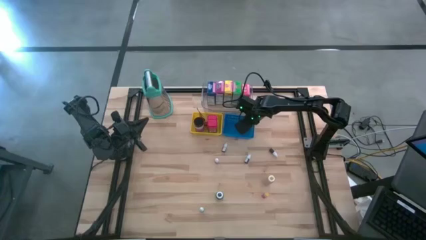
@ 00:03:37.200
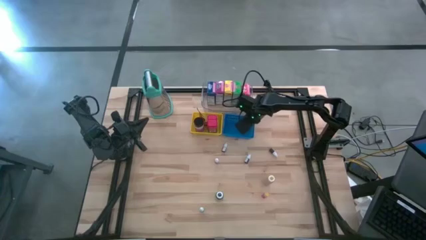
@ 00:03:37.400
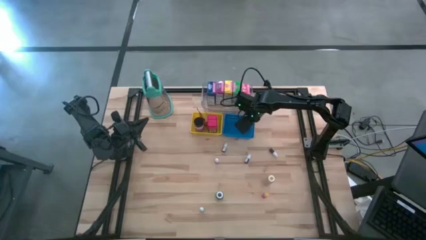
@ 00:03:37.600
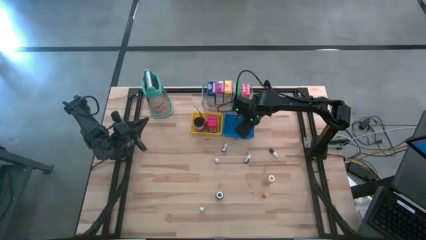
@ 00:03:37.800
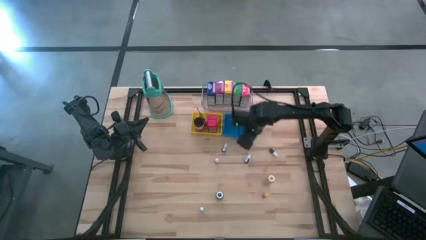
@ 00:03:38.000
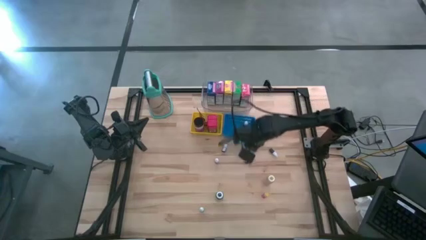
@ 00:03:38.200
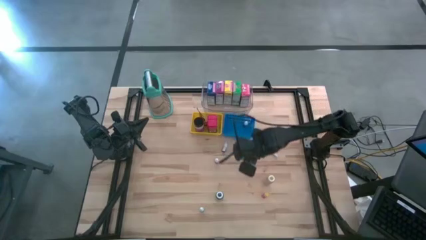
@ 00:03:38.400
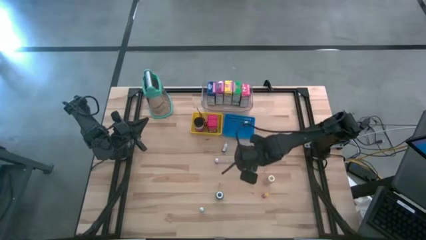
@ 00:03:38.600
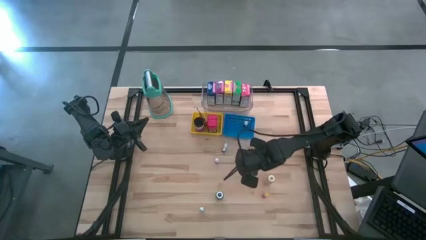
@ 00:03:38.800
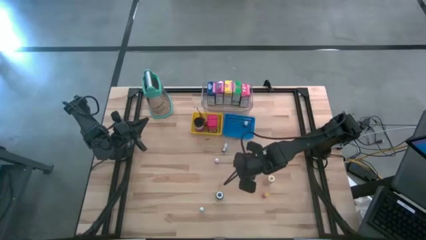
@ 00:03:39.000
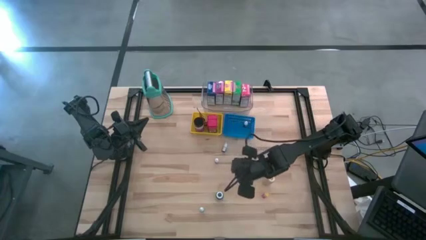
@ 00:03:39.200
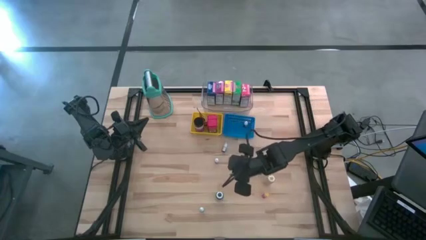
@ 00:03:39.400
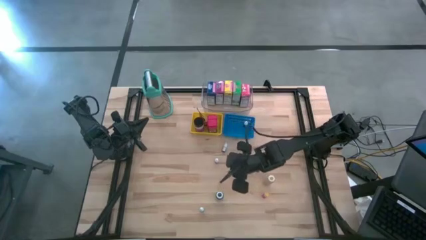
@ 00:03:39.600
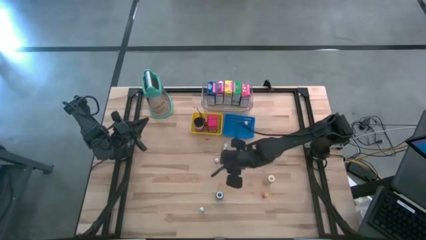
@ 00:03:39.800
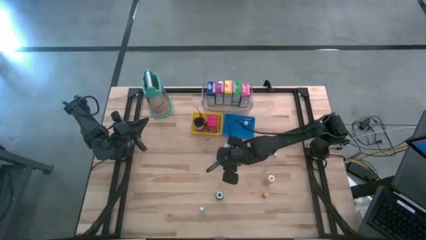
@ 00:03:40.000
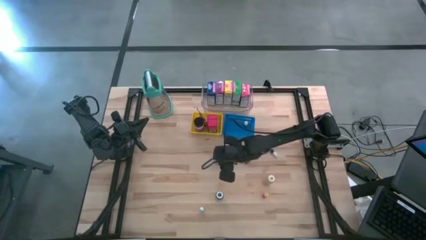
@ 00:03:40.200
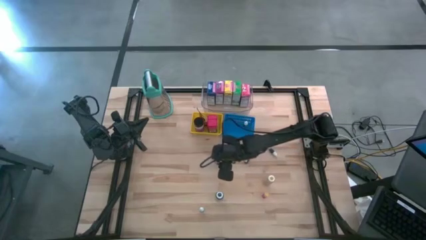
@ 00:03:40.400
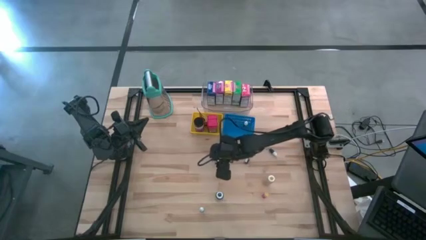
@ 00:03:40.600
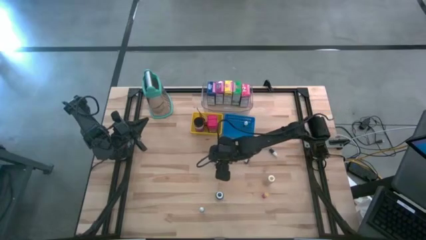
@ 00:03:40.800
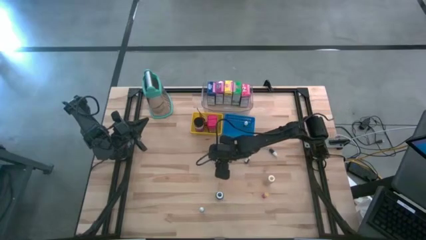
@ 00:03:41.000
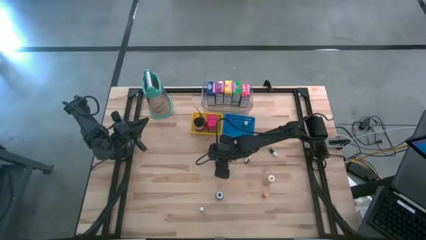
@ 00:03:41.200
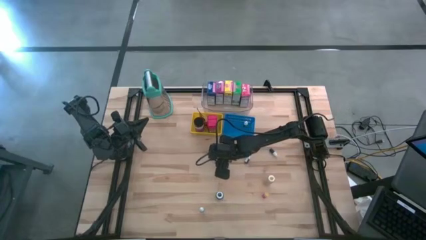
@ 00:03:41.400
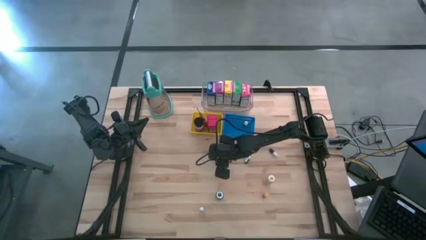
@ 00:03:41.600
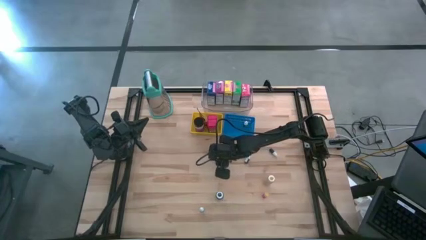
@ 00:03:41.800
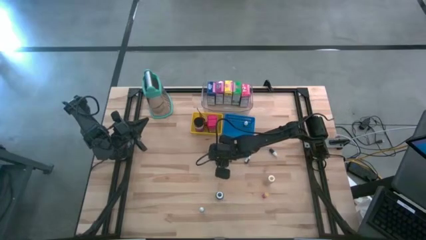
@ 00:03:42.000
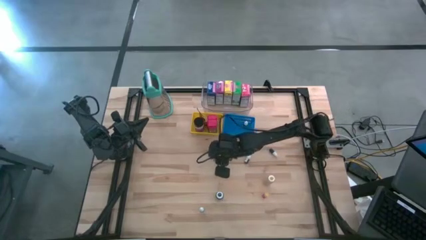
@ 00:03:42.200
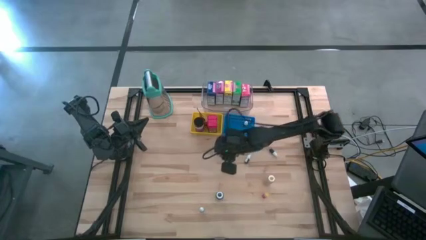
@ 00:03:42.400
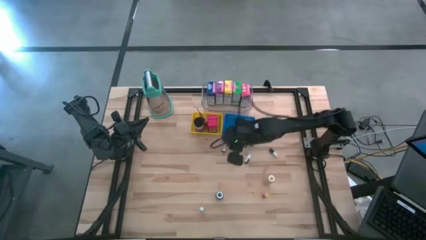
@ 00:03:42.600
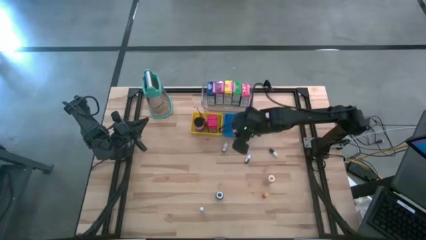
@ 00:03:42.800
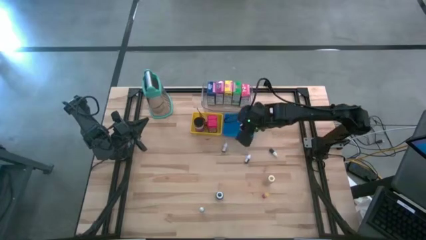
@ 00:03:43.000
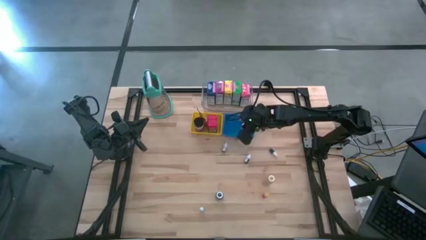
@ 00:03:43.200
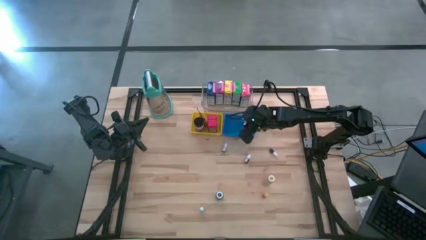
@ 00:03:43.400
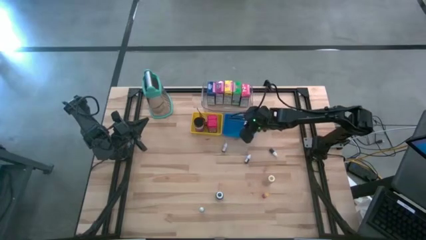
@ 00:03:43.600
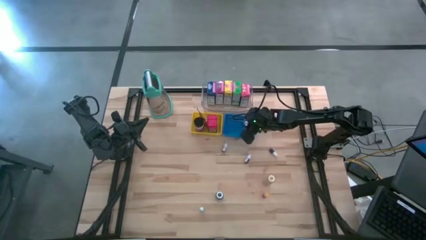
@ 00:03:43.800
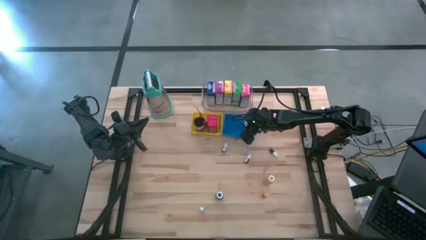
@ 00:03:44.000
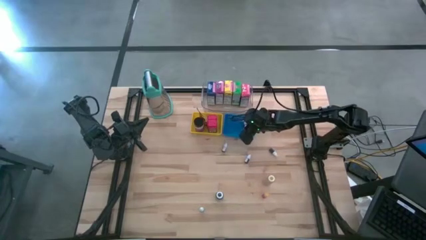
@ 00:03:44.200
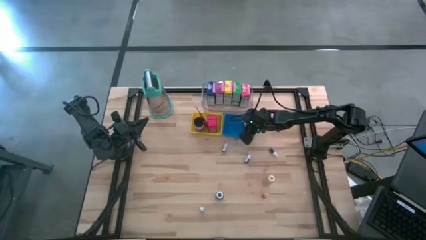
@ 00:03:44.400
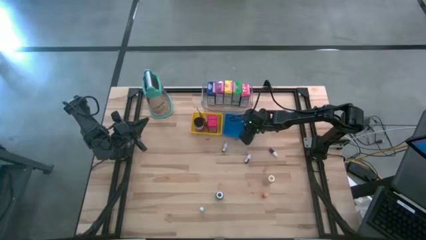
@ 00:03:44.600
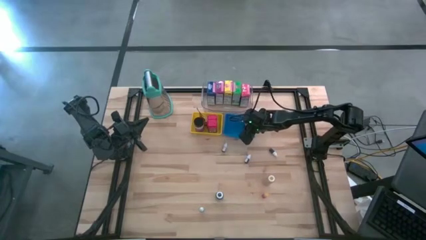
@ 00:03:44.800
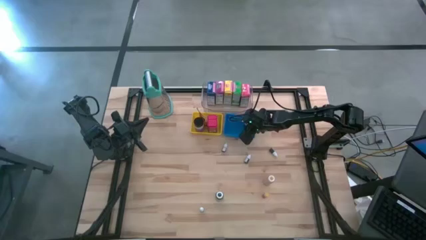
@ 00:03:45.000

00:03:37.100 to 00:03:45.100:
Task: Pick & Place Kitchen Items
Put the small black food coloring bottle into the blue bin

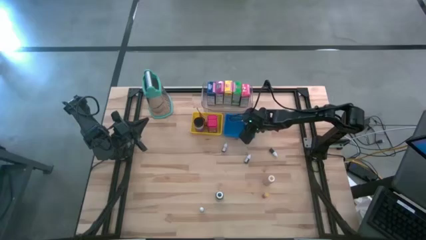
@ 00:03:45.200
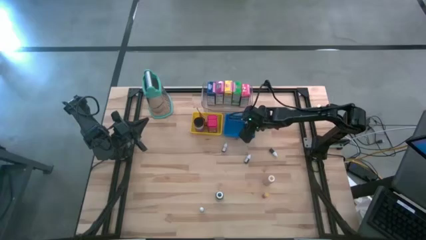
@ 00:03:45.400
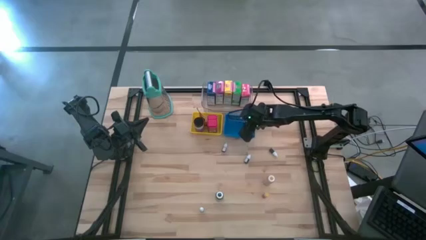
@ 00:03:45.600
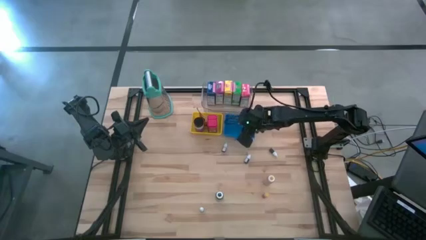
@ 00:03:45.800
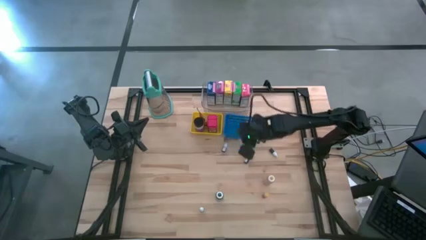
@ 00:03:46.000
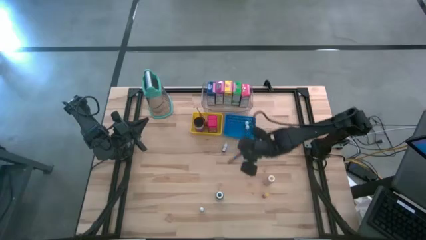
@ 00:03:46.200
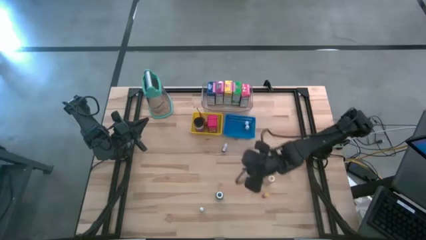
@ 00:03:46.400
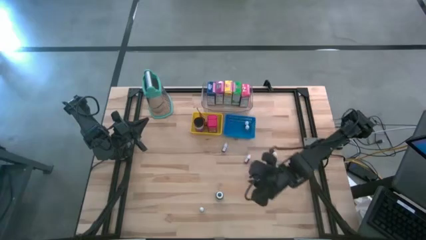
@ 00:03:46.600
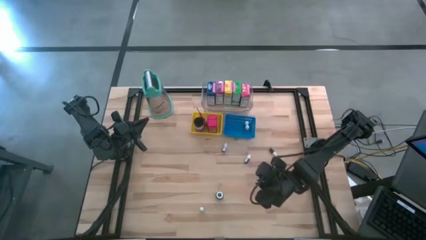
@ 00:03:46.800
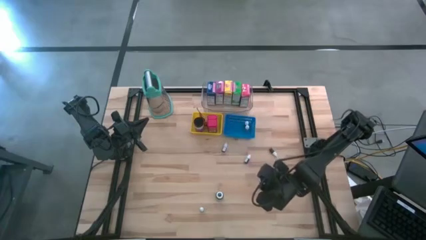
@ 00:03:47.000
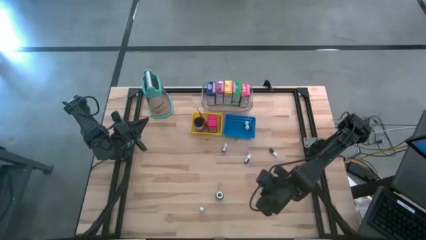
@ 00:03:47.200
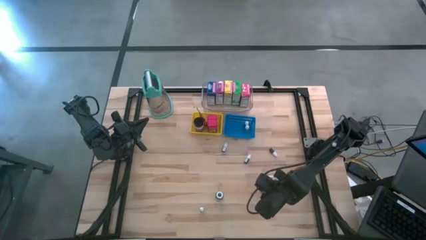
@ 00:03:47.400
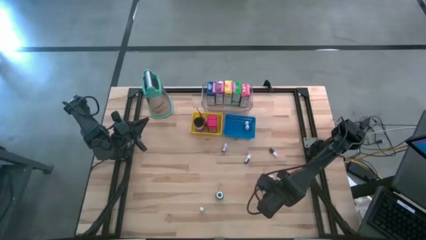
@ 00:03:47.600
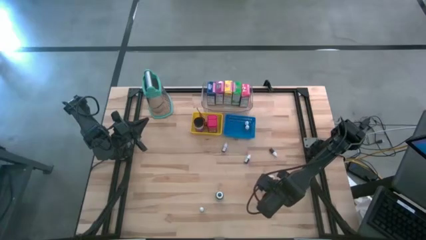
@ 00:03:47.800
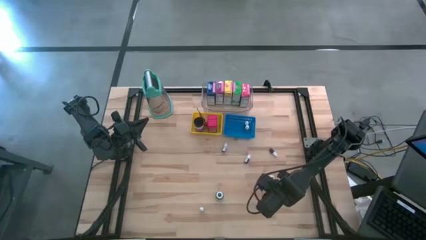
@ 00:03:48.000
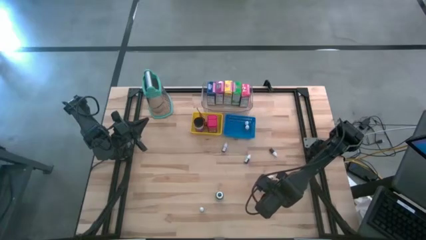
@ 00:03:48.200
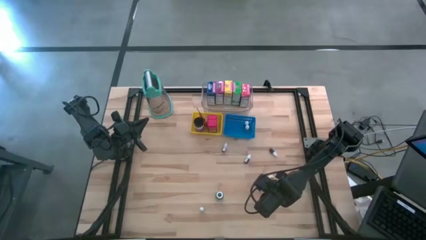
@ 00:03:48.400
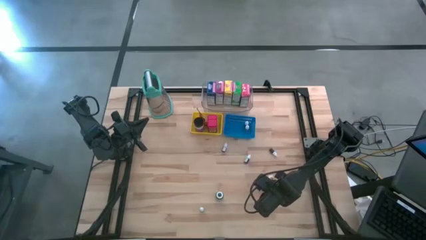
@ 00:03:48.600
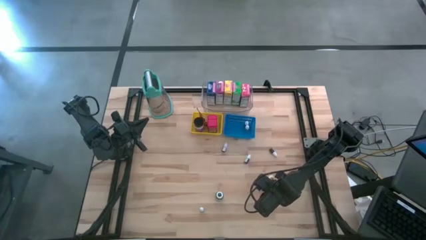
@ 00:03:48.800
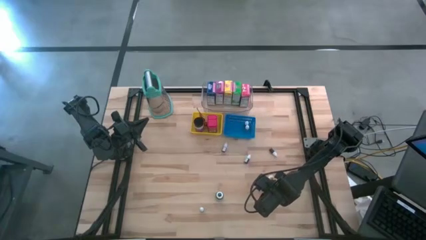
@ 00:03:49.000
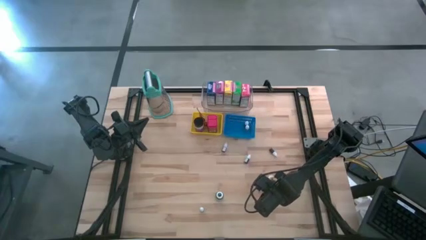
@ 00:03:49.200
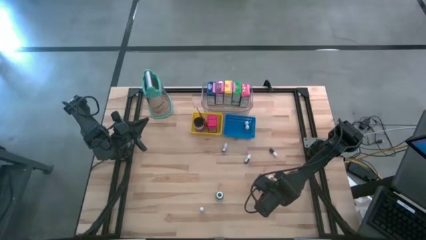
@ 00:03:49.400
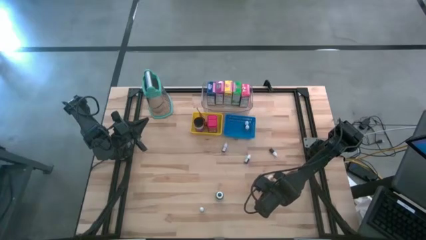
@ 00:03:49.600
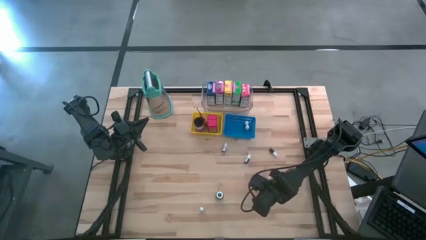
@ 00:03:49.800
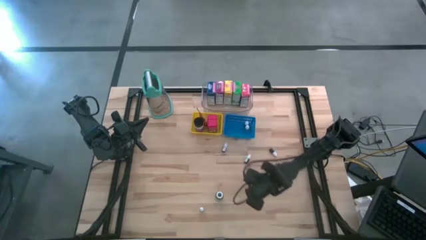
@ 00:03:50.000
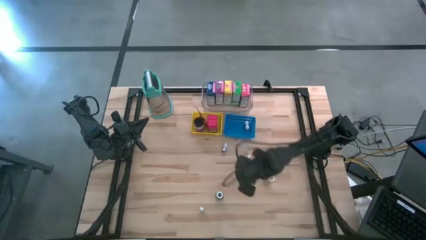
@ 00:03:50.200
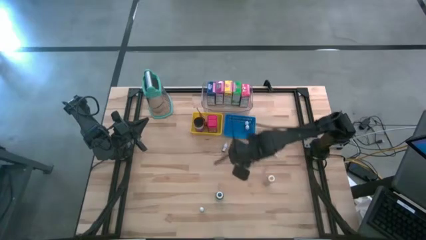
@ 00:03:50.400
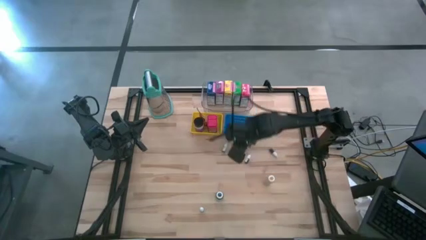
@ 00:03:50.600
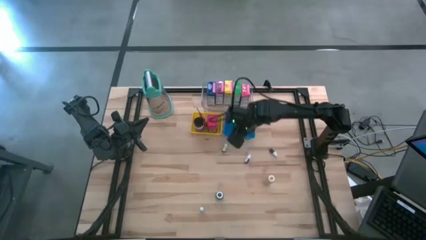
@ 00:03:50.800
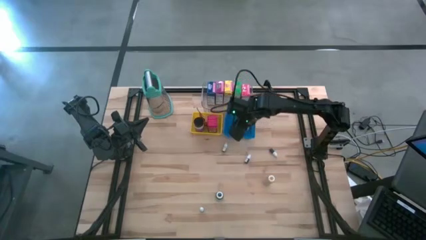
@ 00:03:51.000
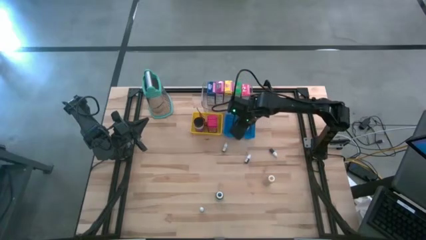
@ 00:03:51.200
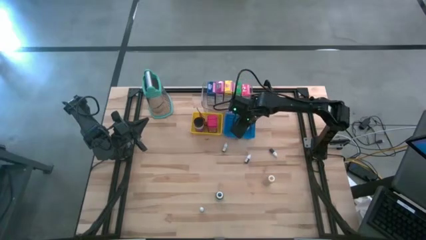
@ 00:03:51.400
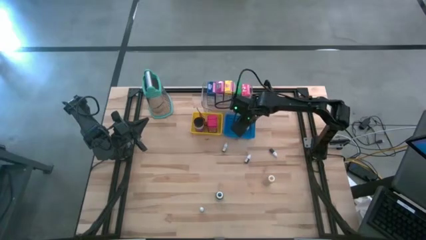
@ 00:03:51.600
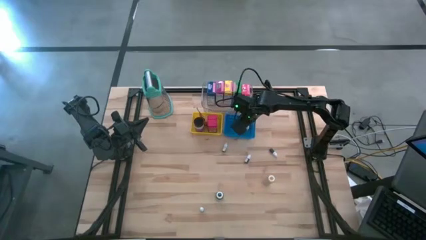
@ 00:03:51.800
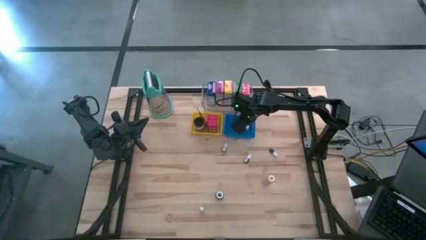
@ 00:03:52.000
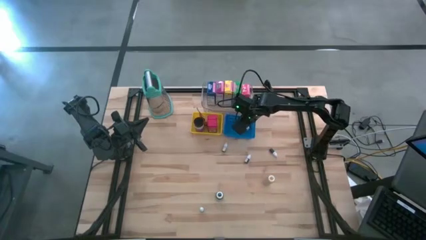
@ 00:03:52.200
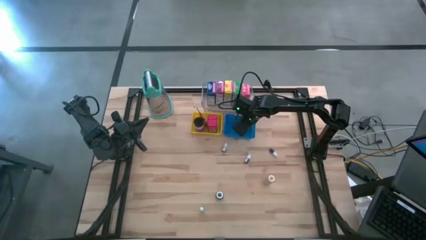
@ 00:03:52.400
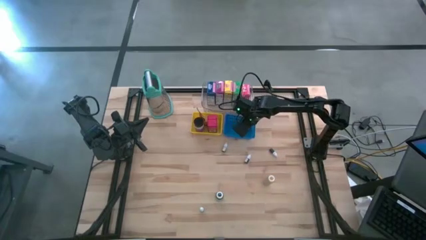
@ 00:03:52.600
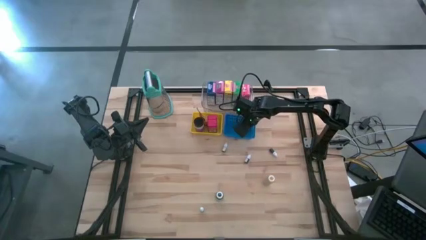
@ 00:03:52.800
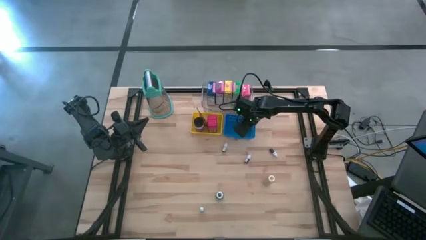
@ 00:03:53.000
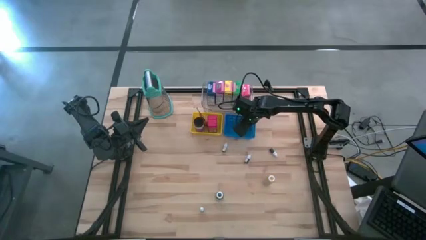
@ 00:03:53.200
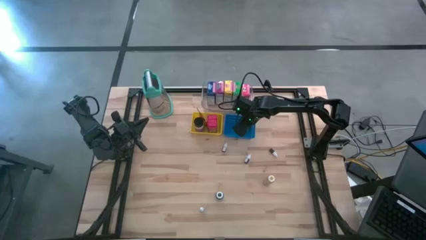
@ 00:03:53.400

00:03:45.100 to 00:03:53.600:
Put the red food coloring bottle into the blue bin
